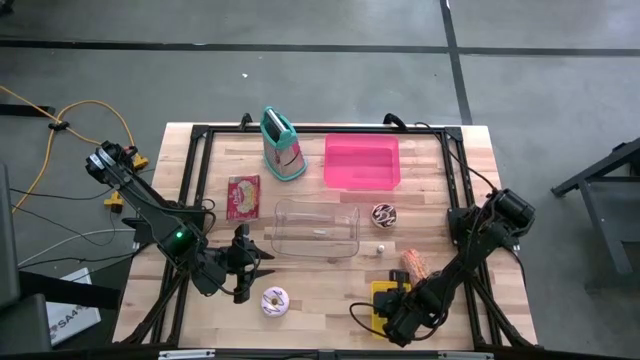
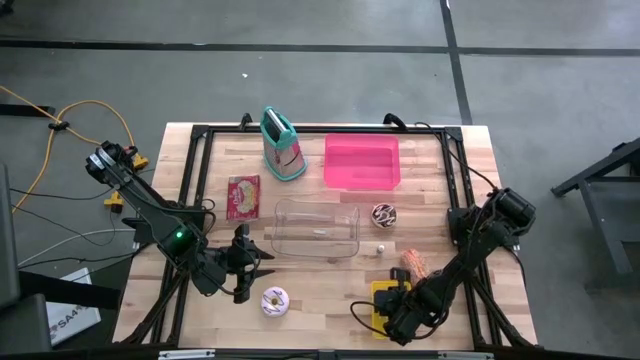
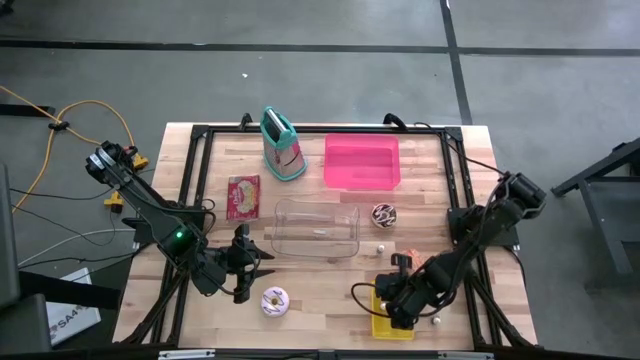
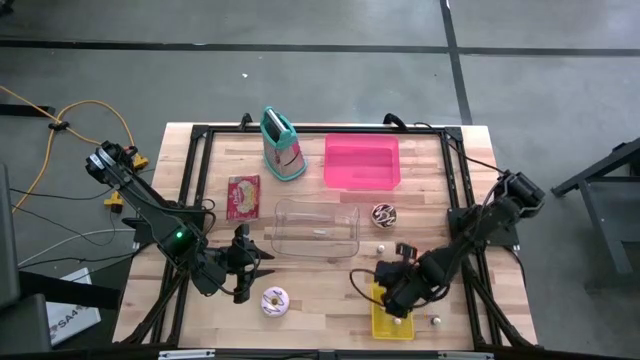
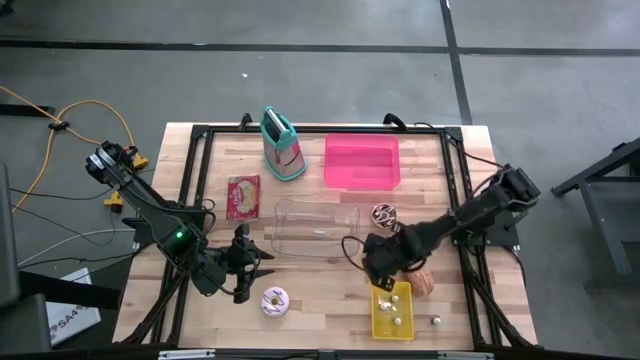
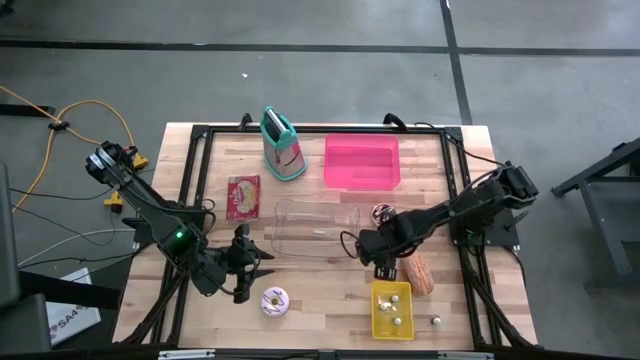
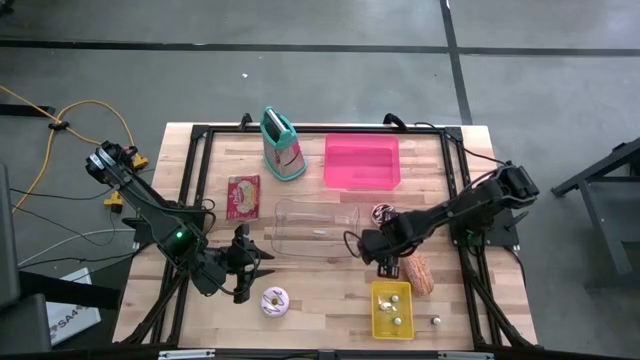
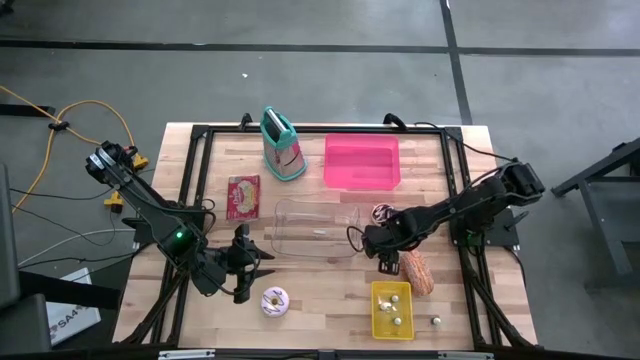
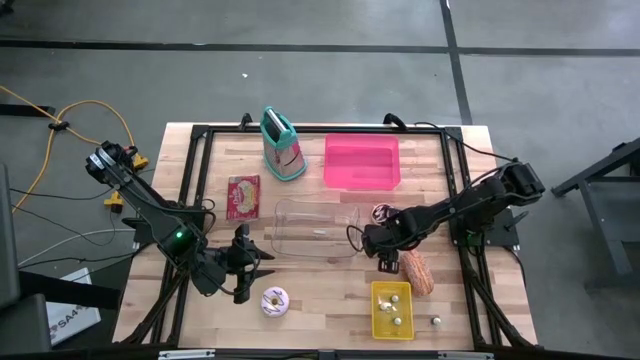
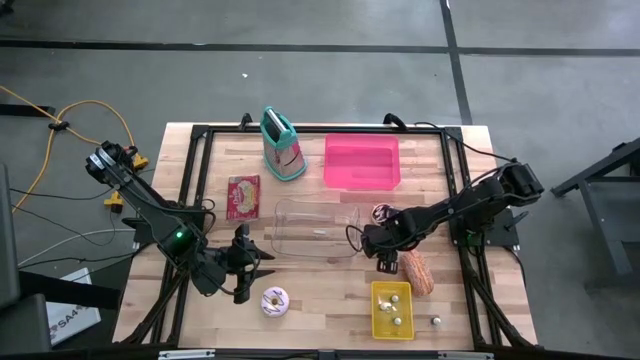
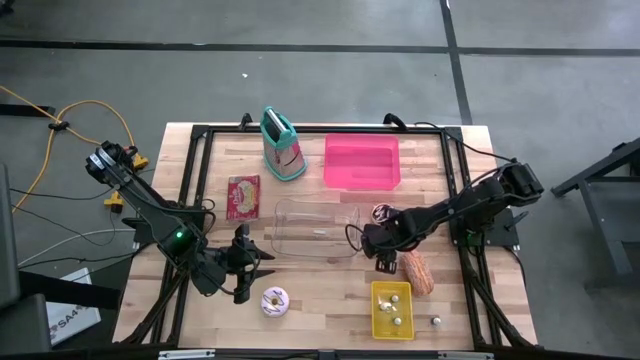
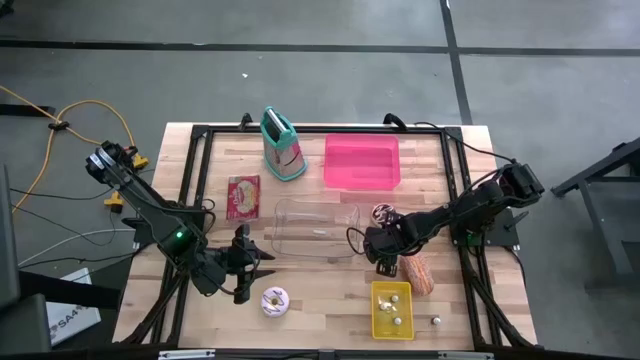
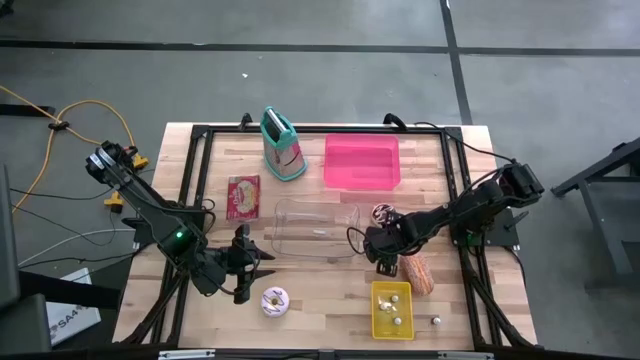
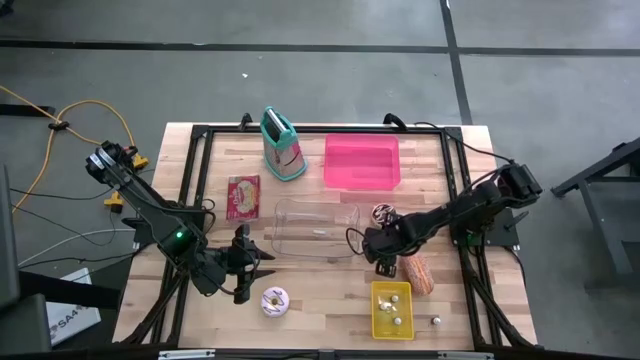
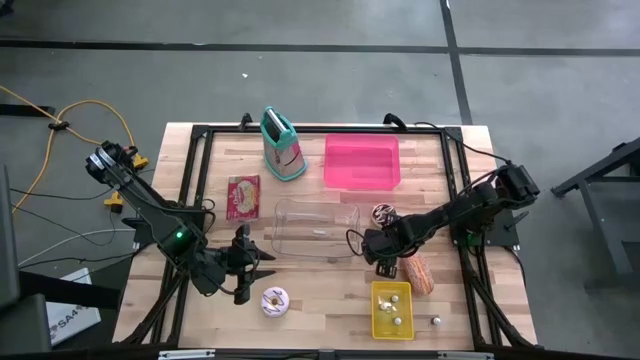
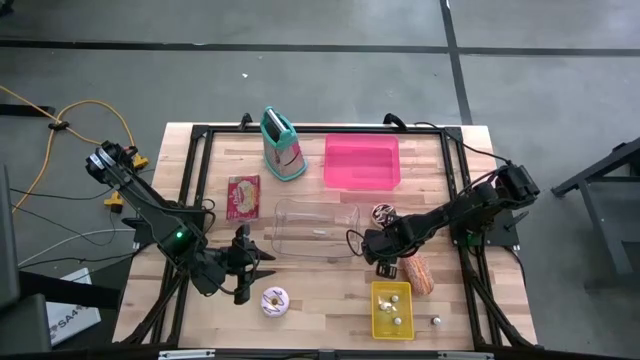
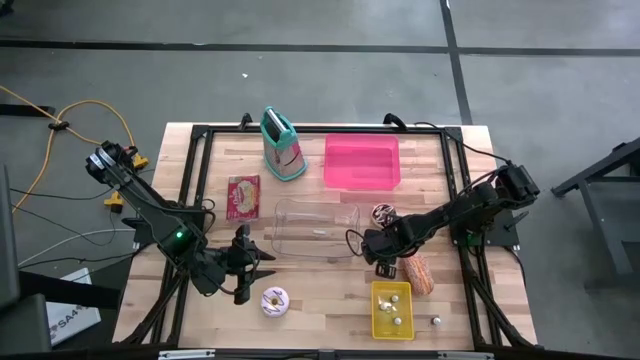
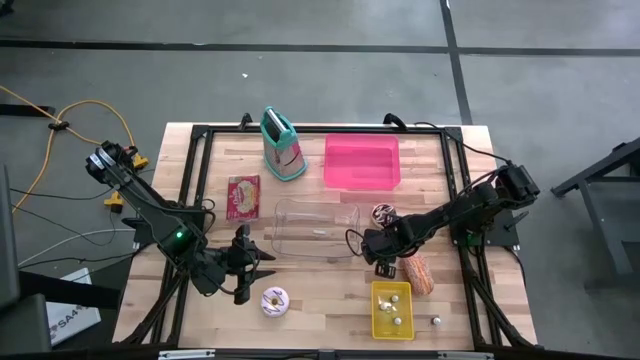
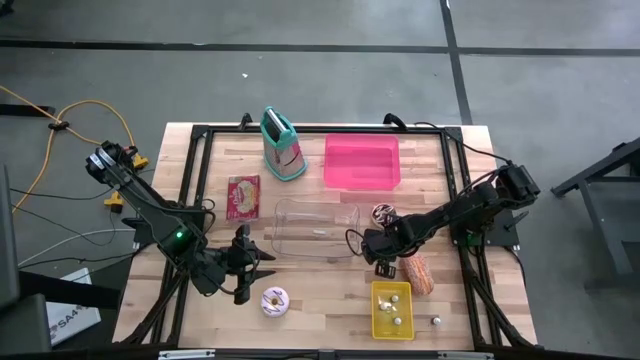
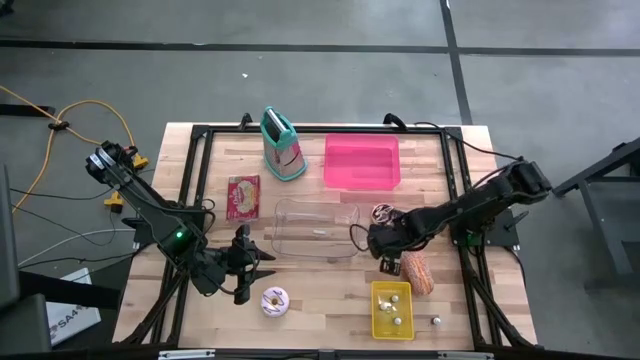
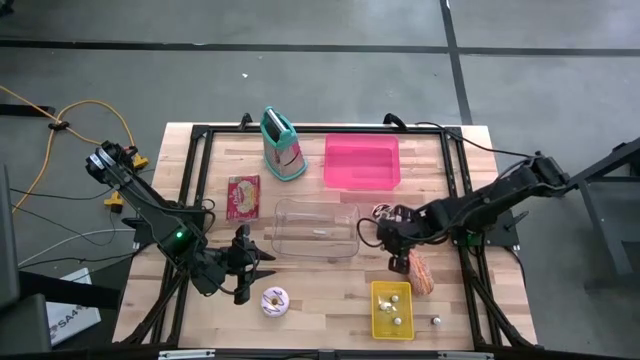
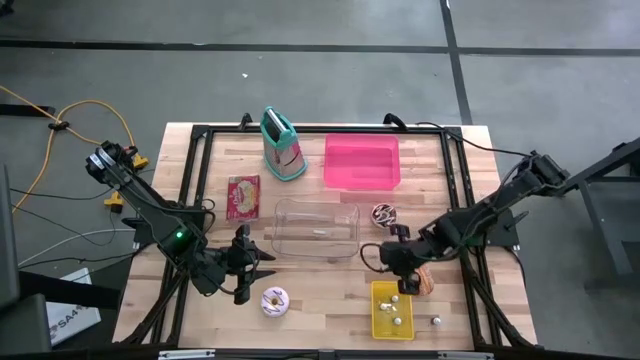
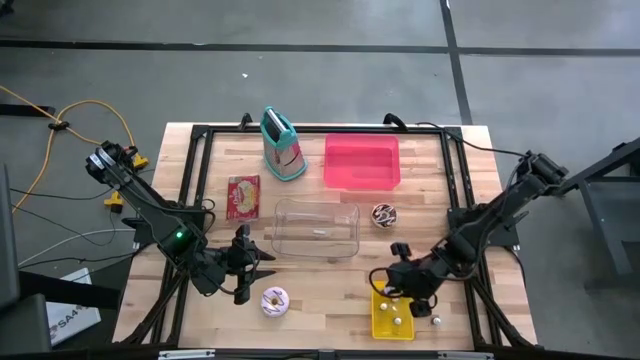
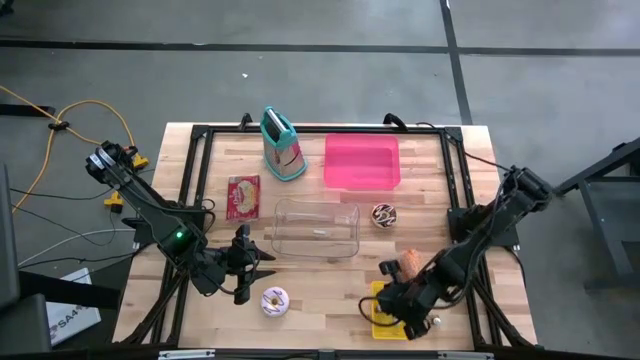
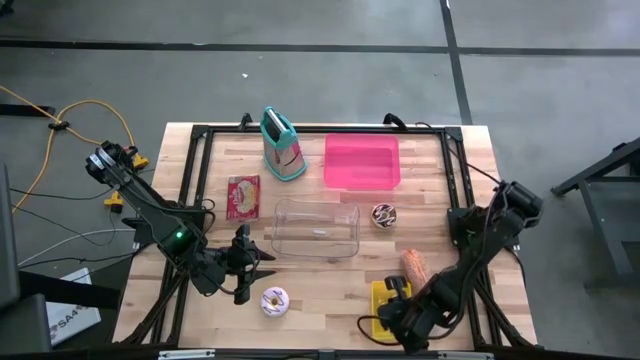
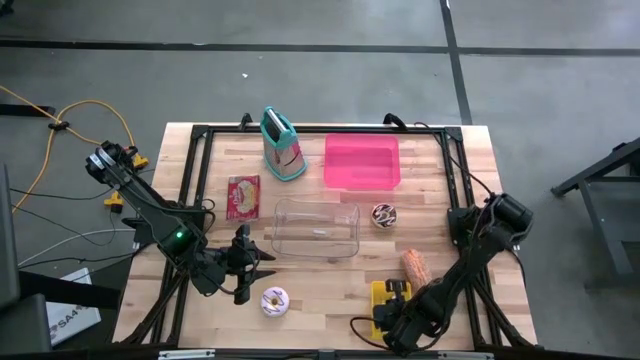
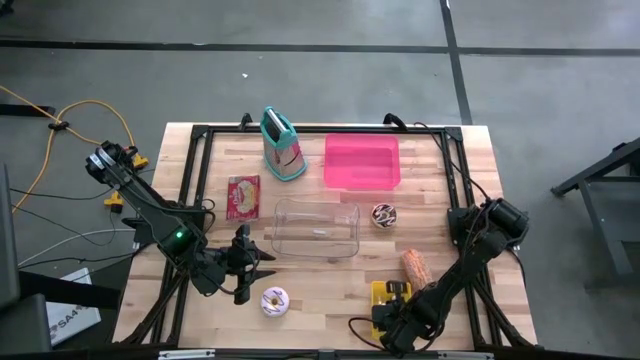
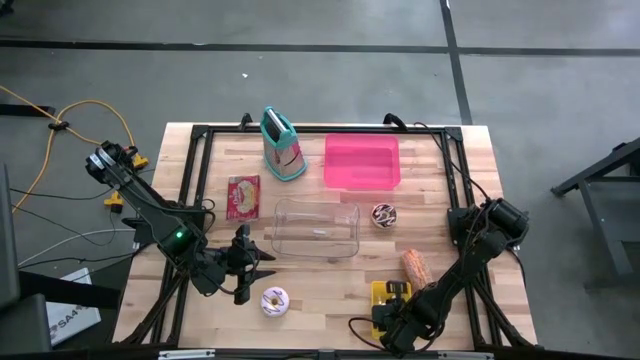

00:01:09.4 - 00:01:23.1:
Put the orange food coloring bottle into the yellow bin
